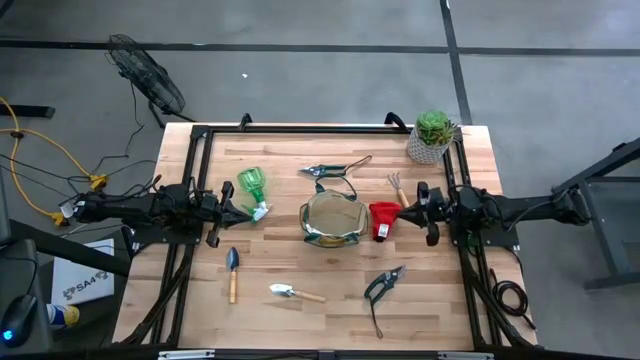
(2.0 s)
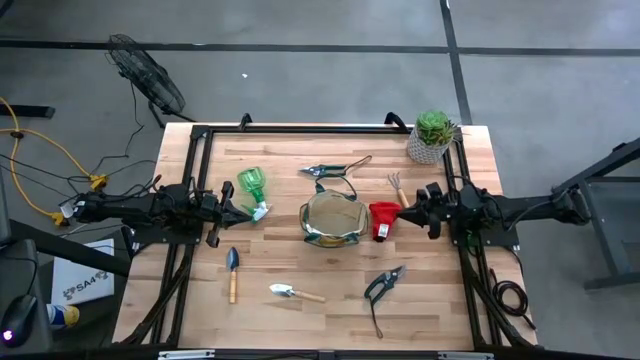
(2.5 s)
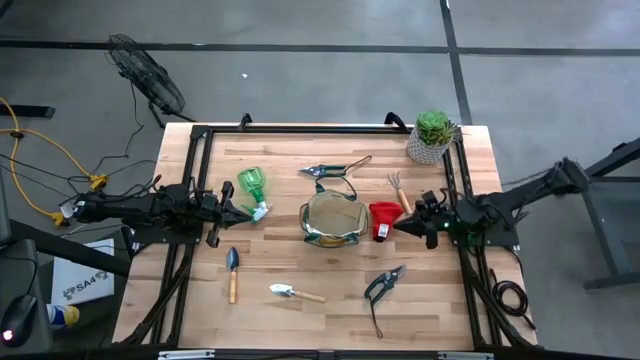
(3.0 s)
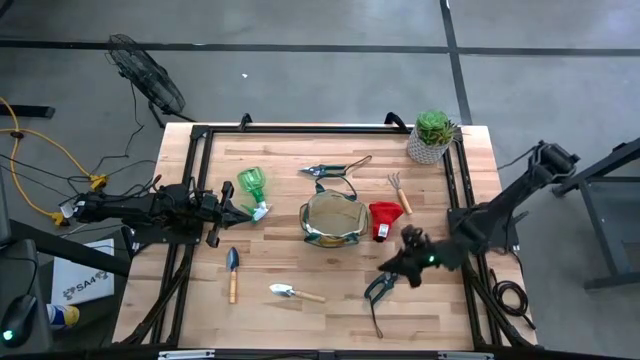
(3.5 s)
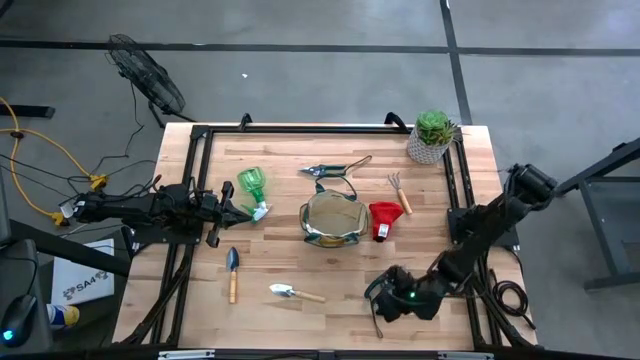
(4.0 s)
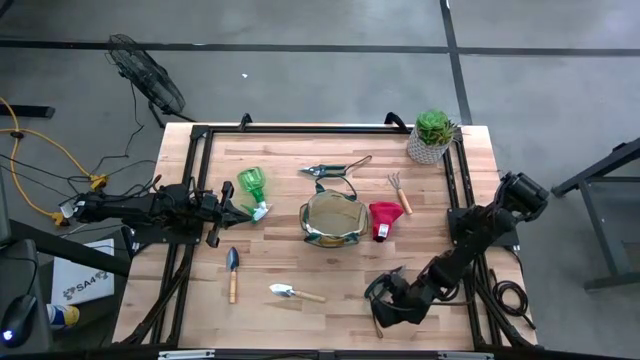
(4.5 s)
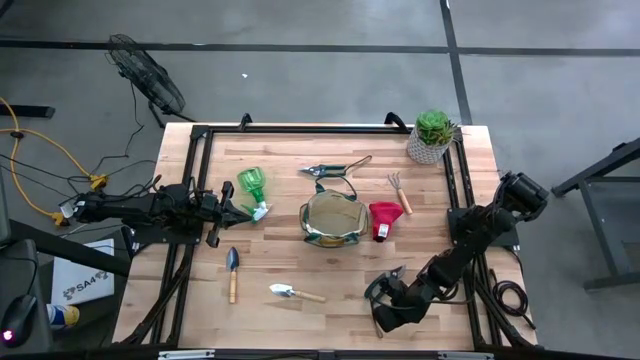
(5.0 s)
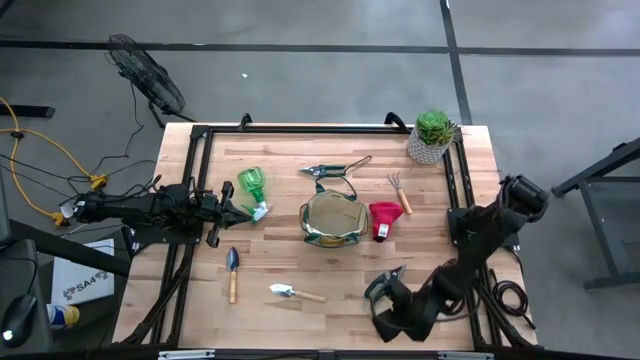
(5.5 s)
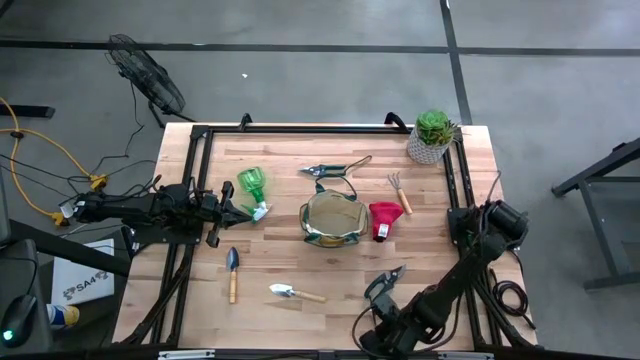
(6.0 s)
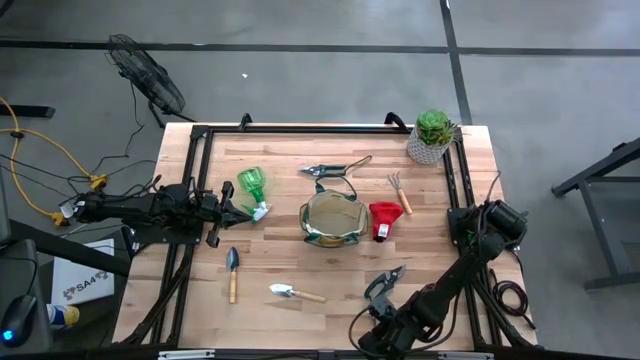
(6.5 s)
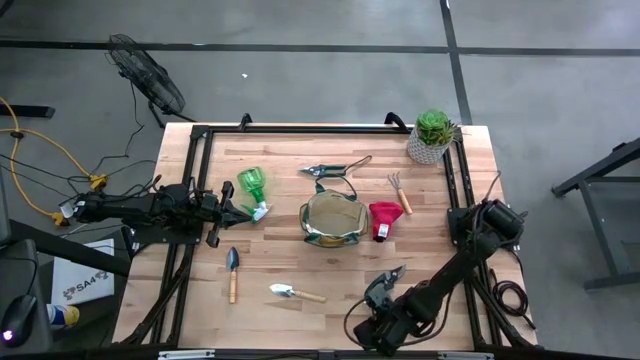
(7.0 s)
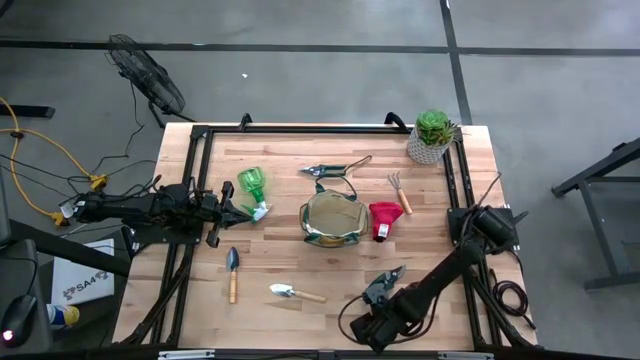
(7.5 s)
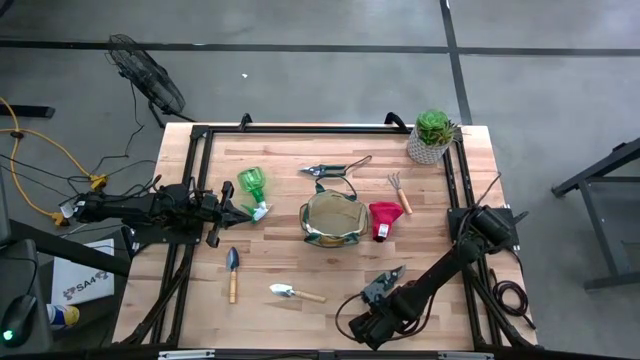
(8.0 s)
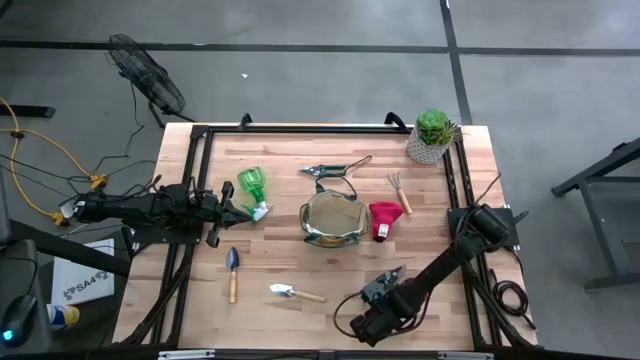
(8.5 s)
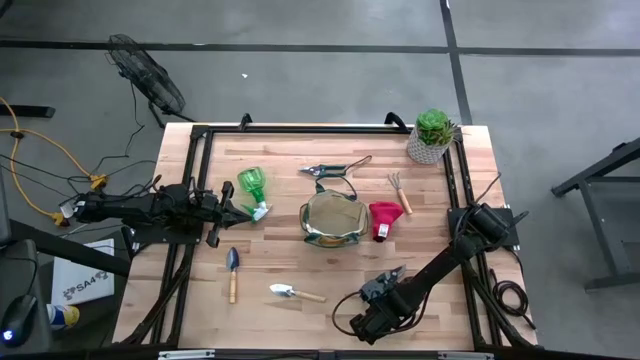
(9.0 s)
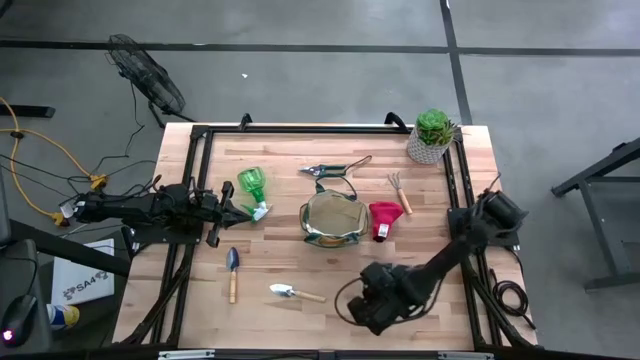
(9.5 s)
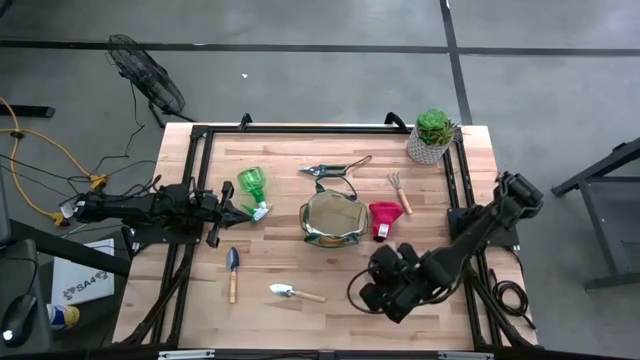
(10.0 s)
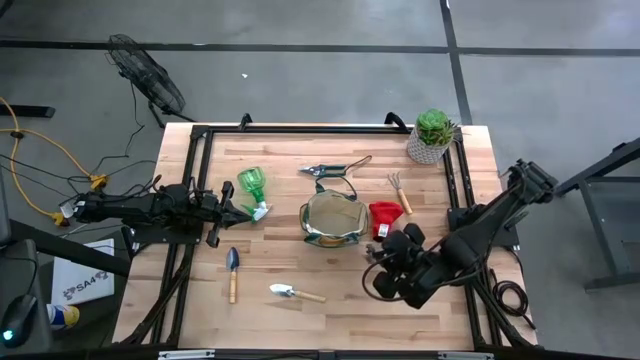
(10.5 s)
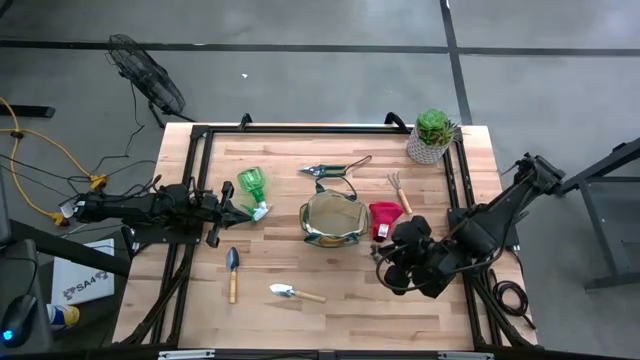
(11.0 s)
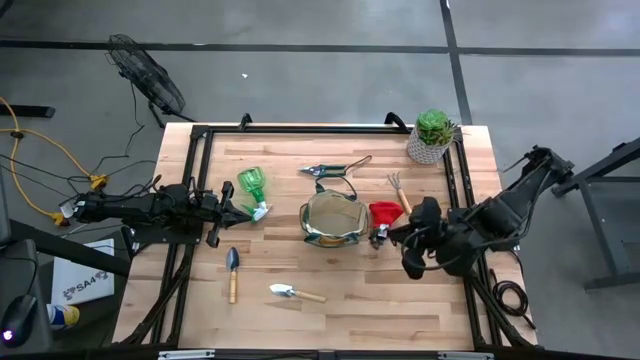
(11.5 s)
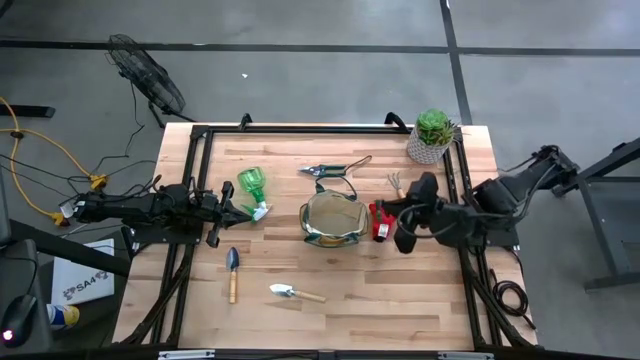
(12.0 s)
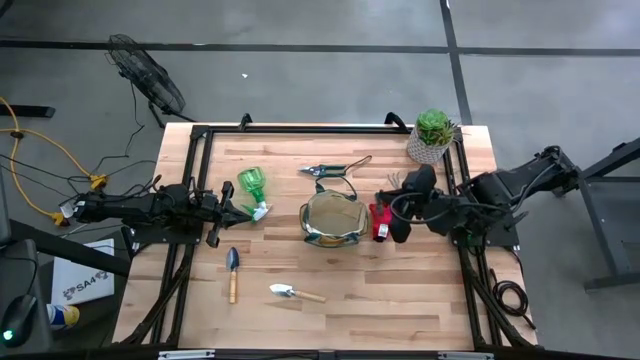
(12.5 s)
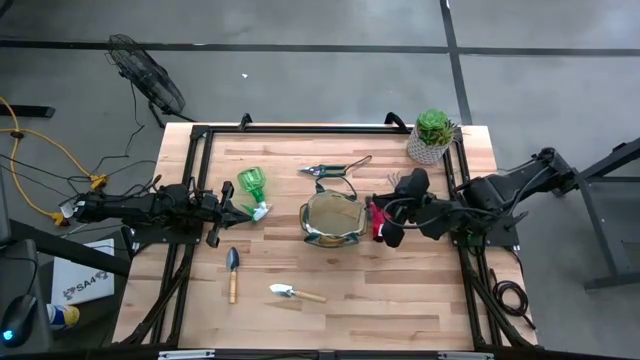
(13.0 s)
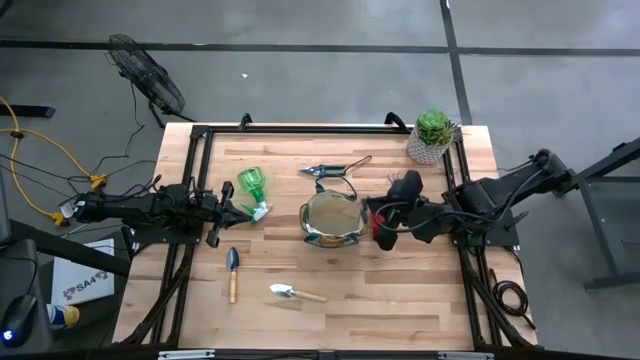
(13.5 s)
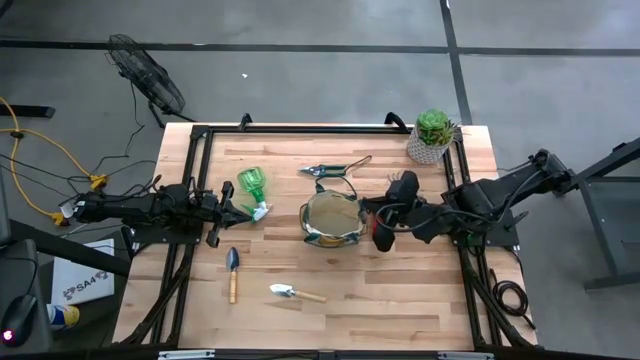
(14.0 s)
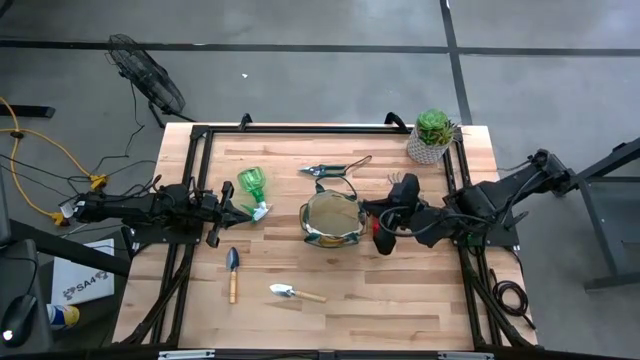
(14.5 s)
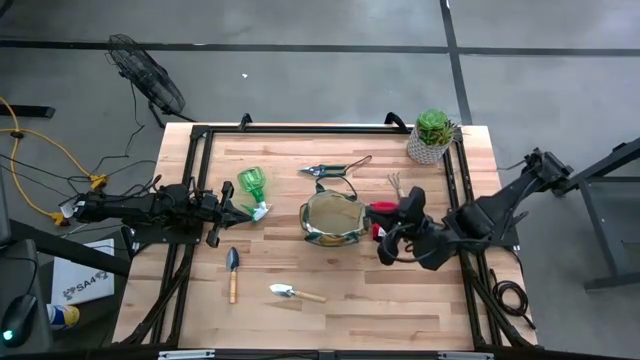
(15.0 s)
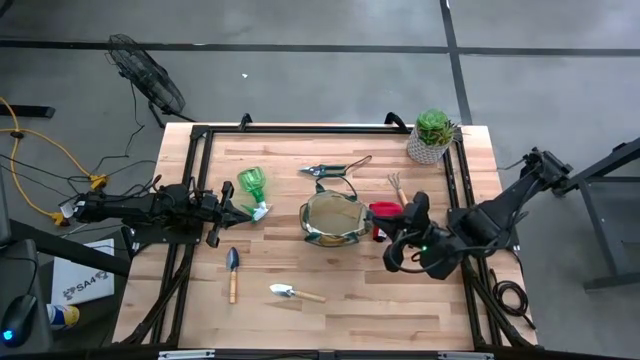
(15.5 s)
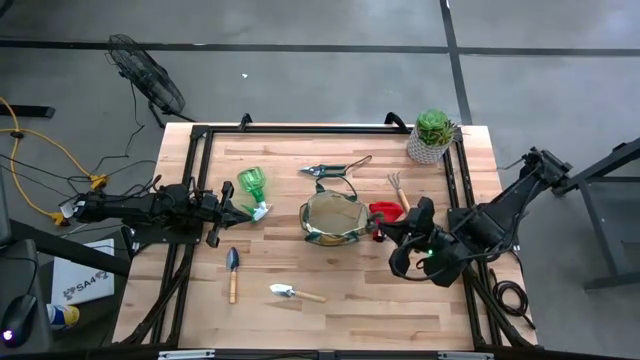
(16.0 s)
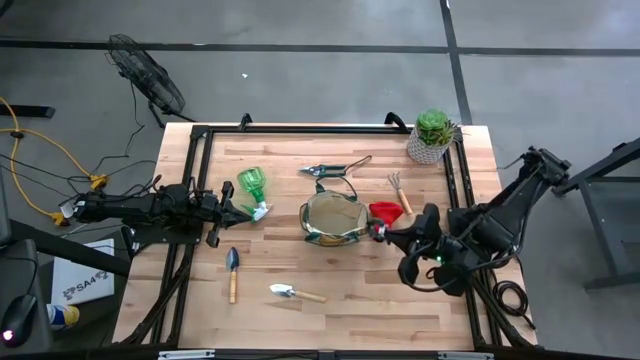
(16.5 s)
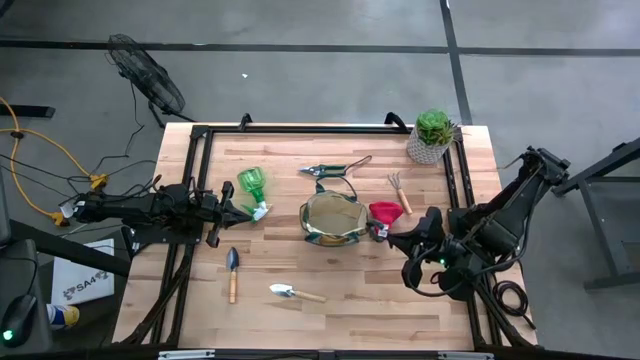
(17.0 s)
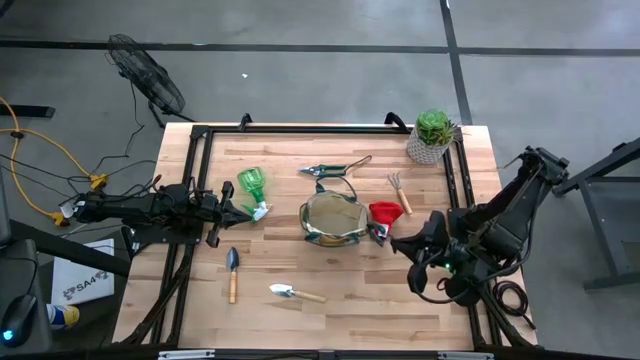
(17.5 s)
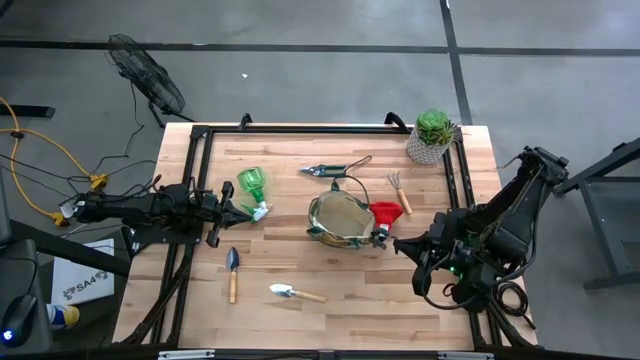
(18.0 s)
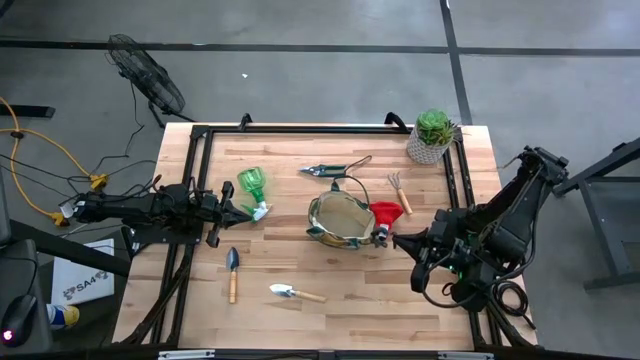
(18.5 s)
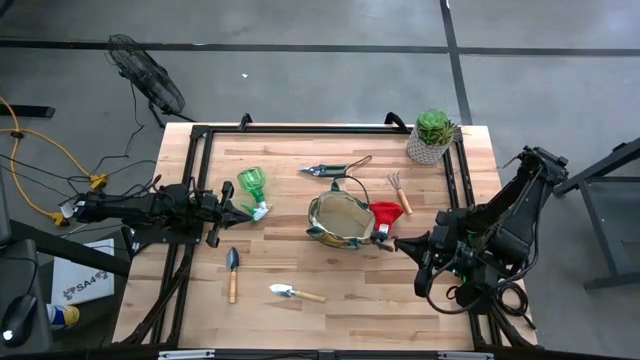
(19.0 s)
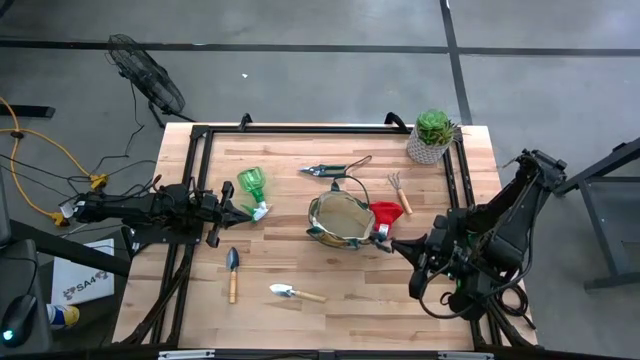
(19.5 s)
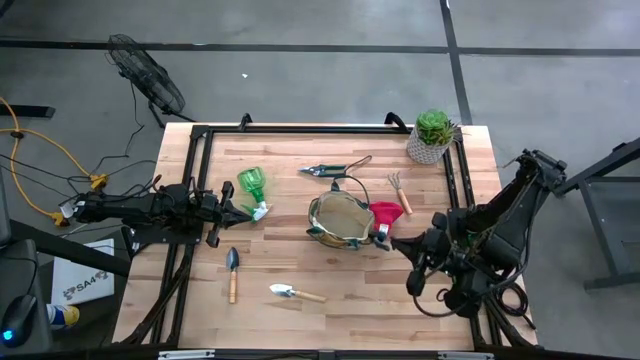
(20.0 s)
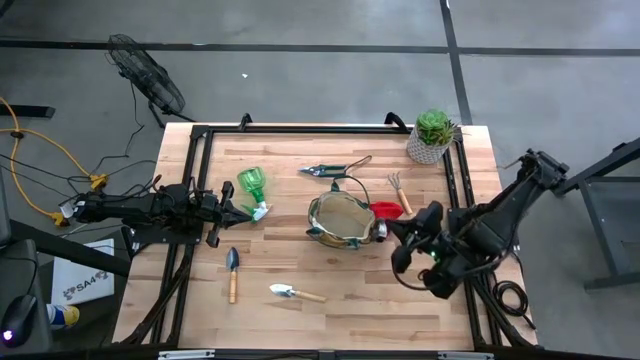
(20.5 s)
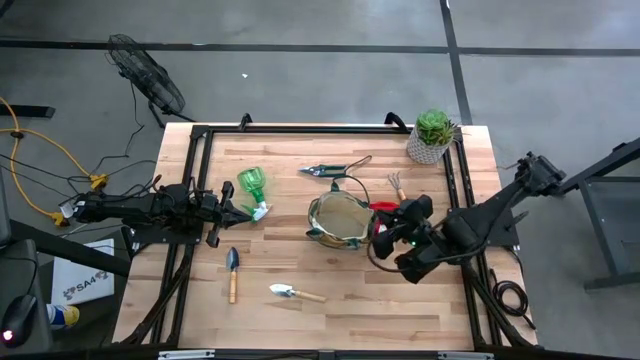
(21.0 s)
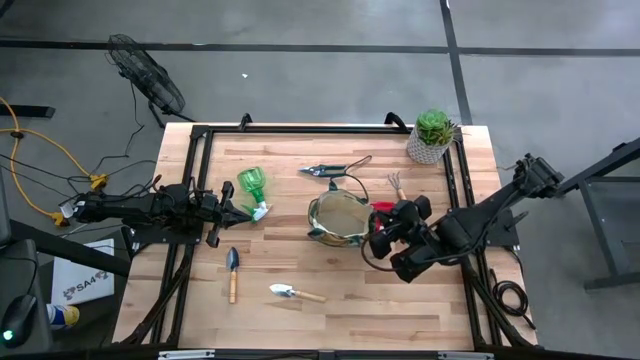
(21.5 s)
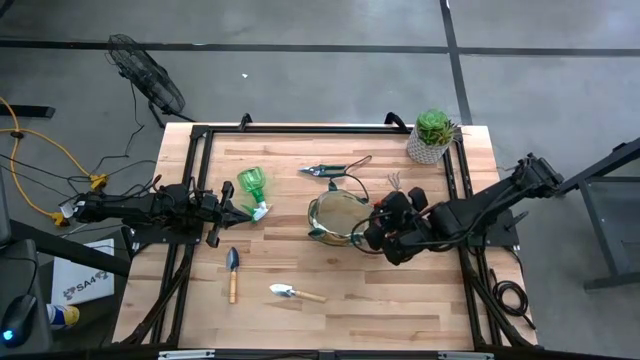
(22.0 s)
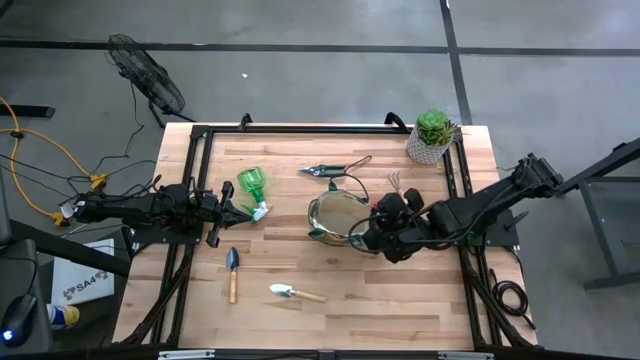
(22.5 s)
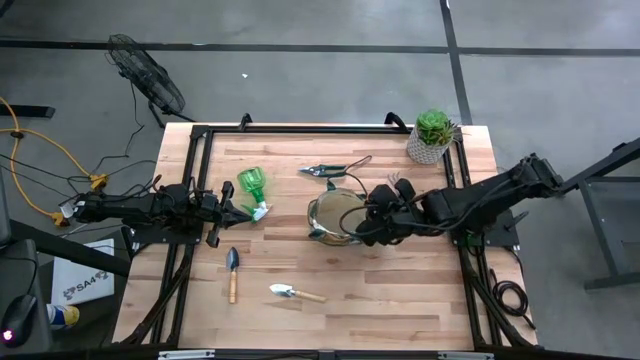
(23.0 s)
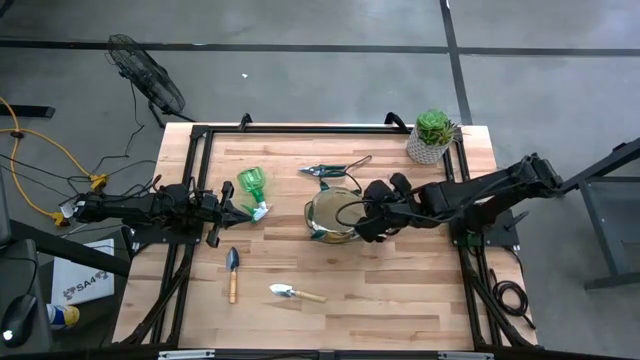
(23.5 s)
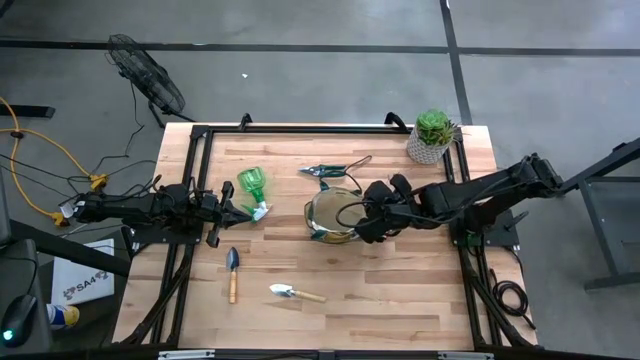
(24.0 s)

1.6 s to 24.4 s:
Task: Pick & Place Garden tools in Gardening bag
Put the bottom green shear scissors into the gardening bag
